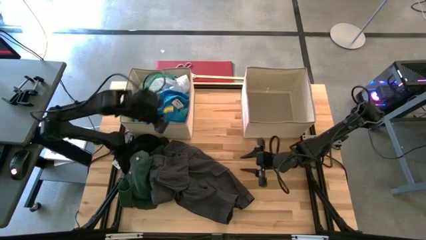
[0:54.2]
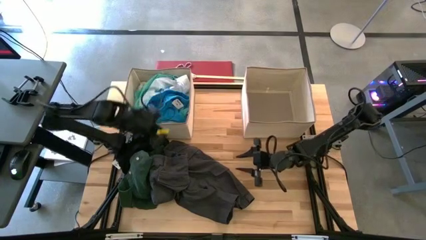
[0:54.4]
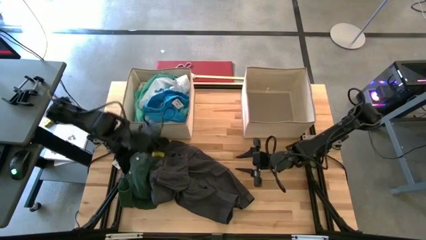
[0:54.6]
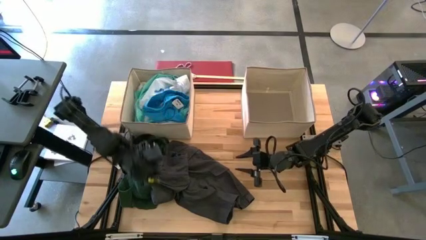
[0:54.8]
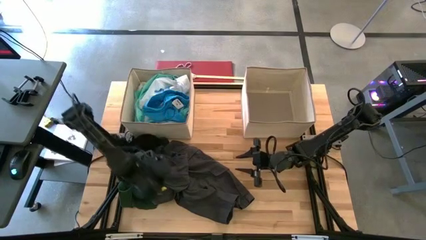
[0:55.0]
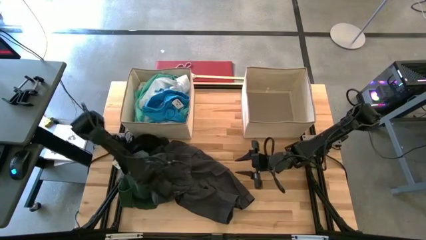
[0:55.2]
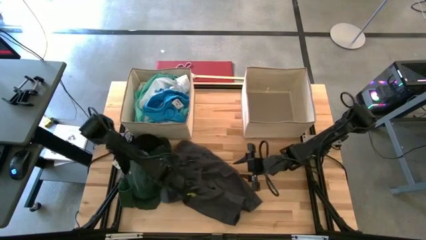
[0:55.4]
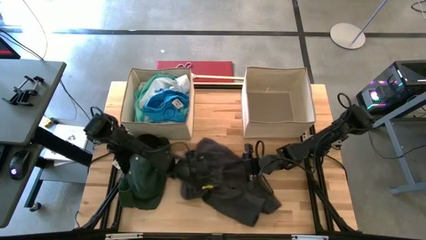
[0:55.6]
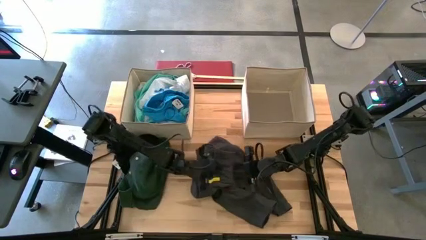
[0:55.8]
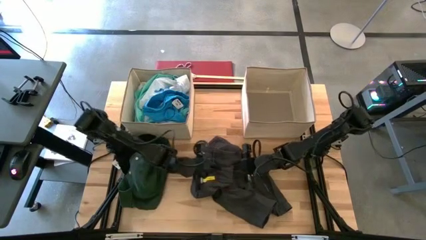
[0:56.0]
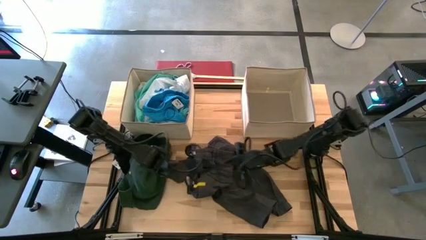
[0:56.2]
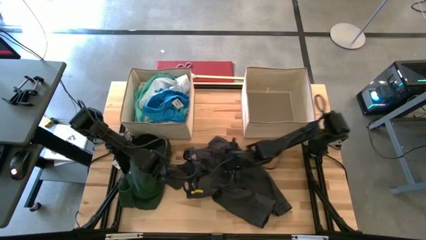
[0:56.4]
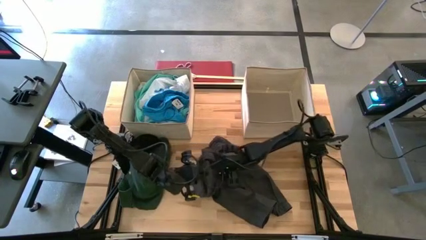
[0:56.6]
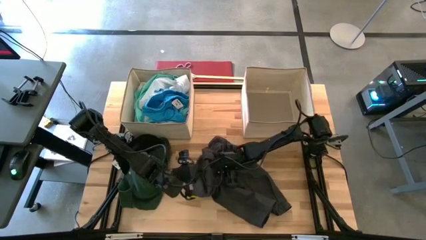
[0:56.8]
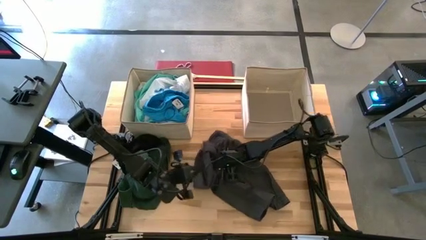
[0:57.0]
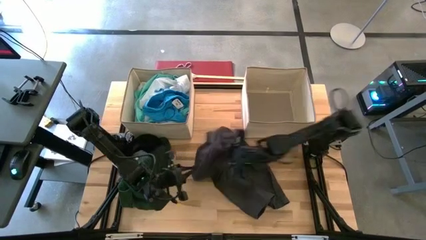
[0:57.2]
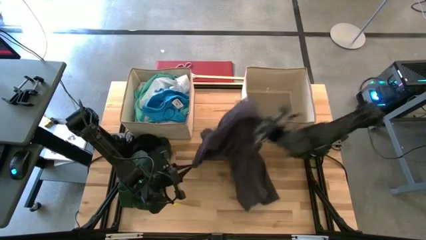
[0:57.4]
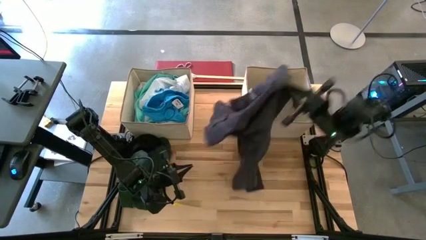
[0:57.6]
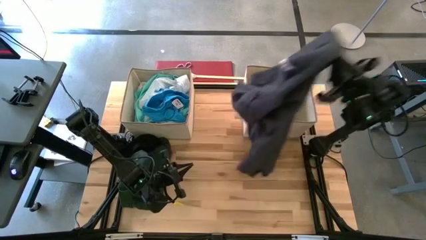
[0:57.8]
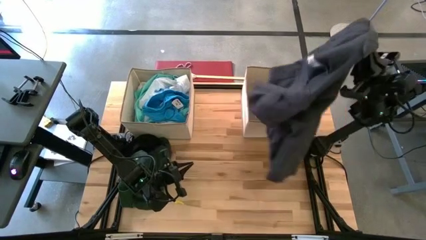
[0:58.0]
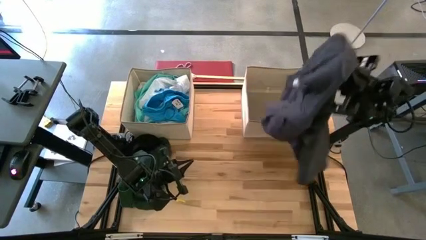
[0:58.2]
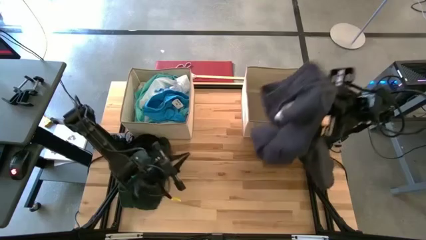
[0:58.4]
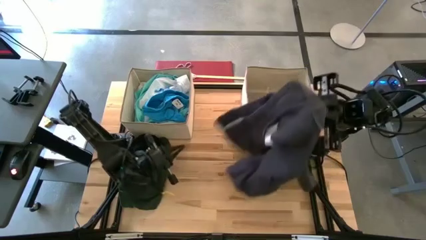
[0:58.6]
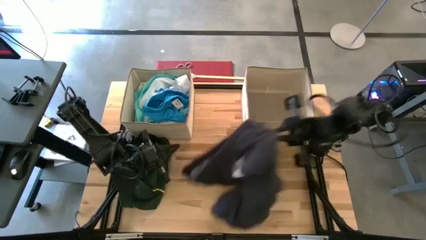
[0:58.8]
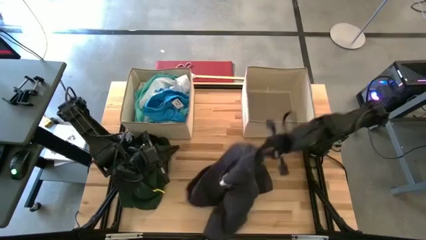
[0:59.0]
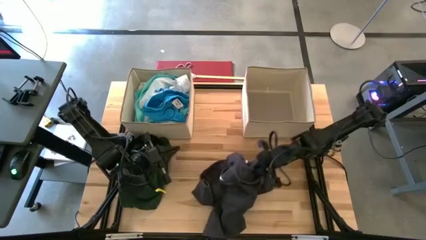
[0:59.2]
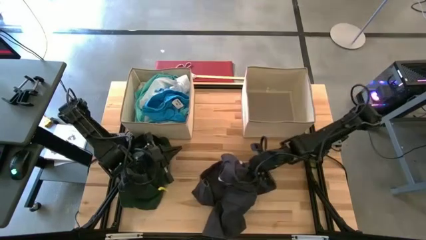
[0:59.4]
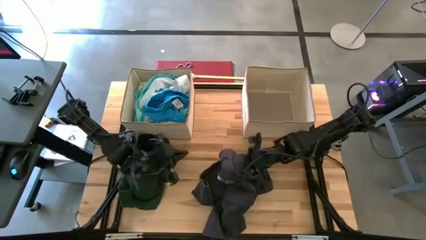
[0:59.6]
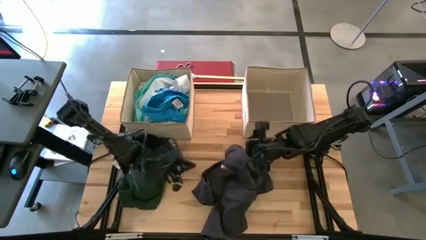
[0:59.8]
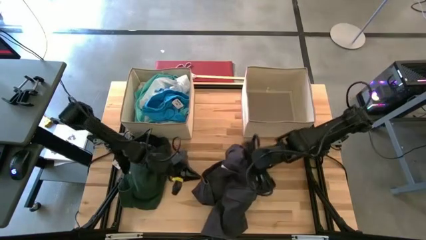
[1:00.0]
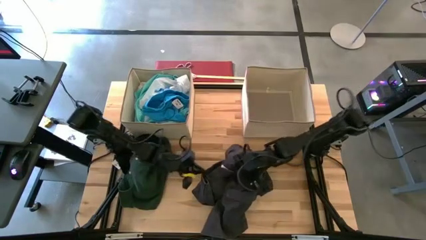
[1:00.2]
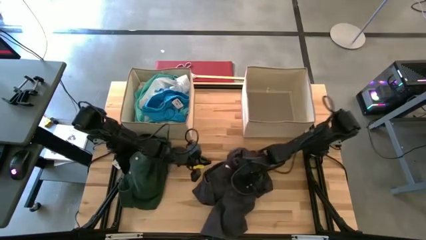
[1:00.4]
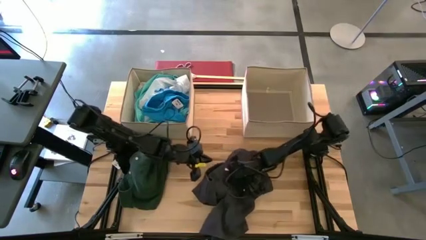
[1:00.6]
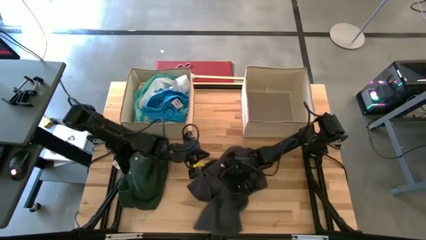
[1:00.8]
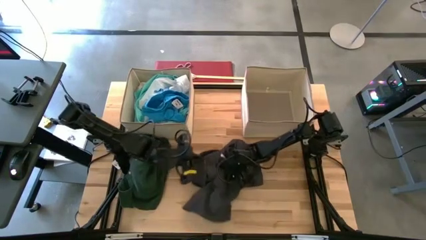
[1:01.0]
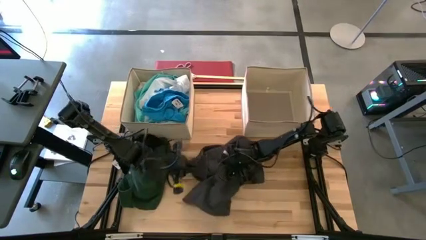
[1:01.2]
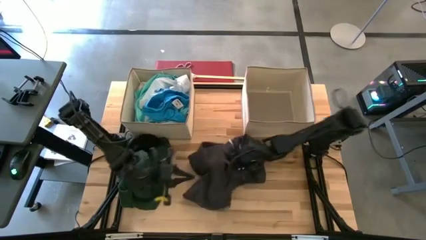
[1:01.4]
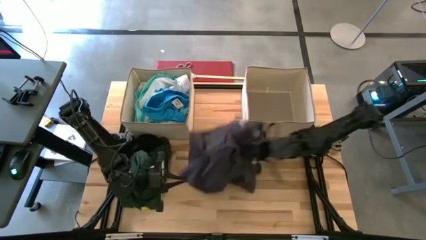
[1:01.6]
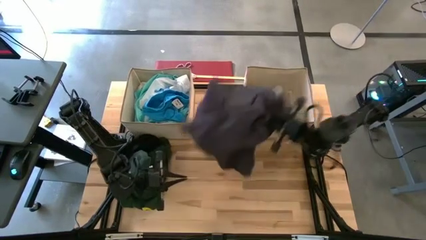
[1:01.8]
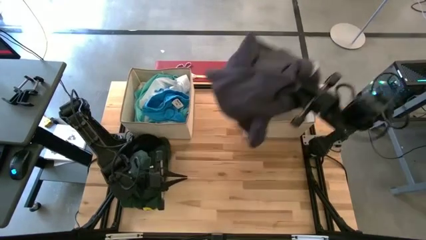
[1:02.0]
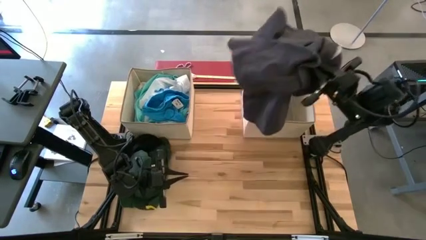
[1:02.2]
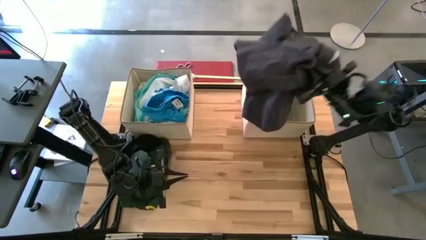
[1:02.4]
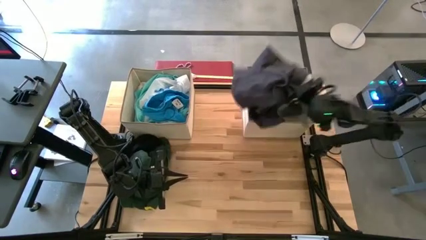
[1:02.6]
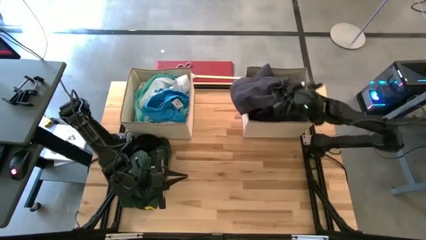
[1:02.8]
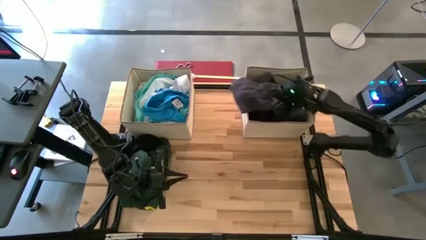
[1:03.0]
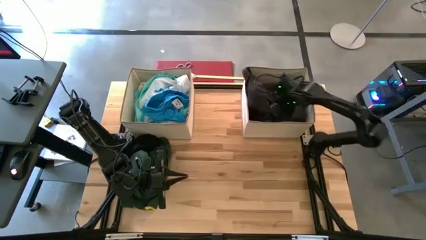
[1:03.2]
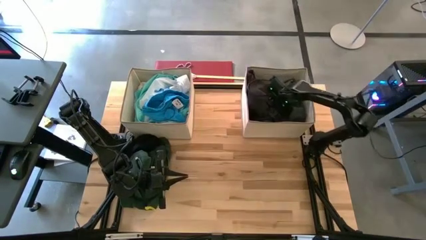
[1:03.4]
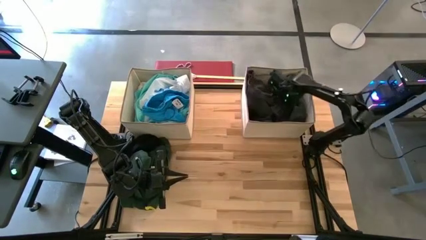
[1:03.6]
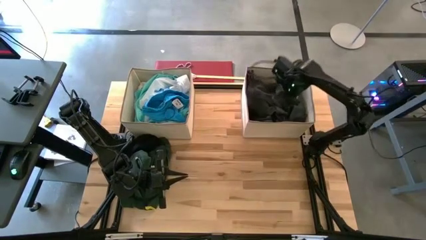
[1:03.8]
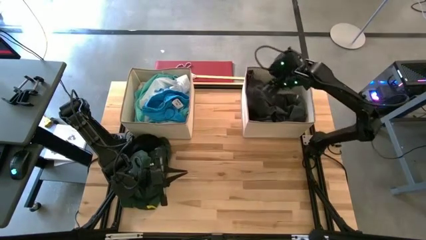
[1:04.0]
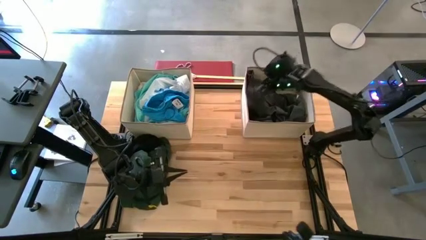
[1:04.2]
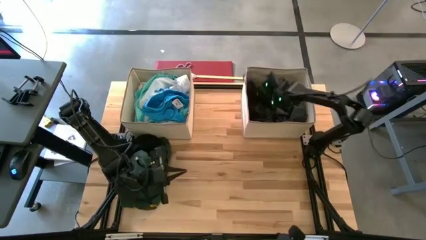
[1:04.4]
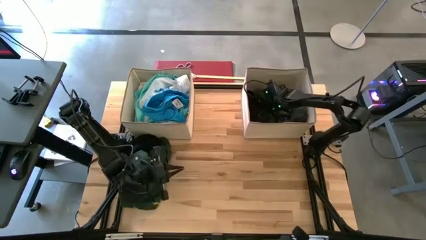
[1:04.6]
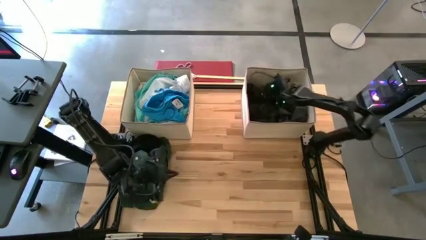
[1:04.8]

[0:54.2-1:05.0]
Task: Sort clothes
Put the pants into the right laundry organizer

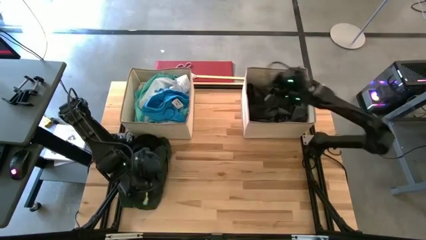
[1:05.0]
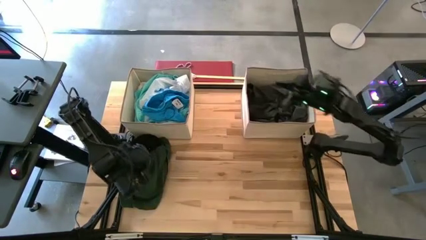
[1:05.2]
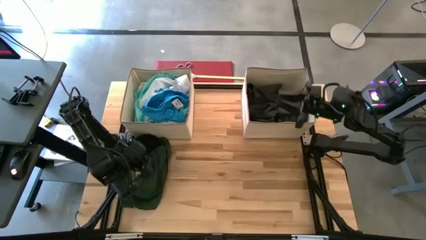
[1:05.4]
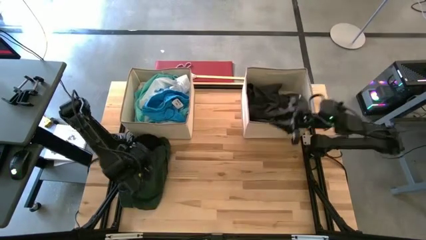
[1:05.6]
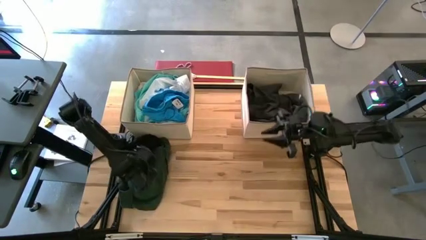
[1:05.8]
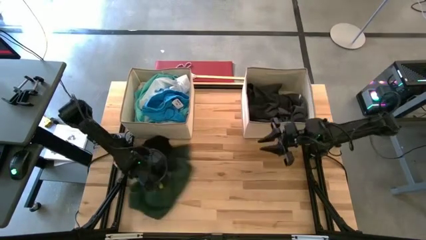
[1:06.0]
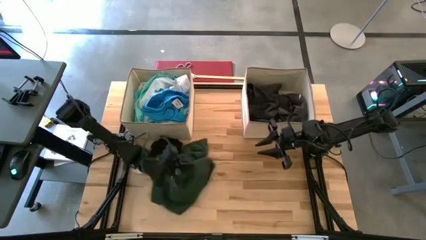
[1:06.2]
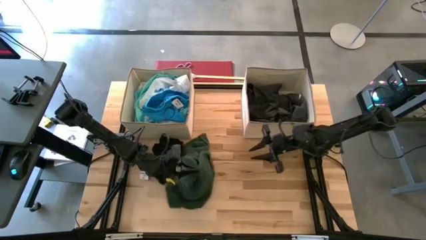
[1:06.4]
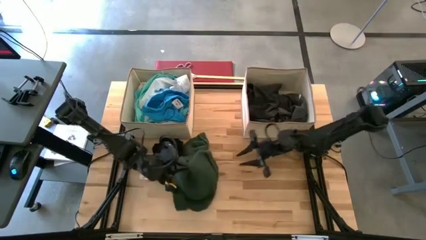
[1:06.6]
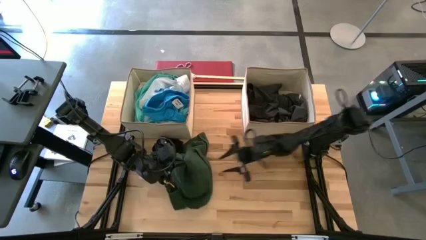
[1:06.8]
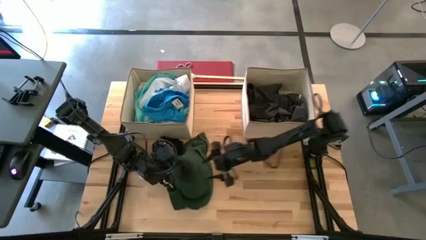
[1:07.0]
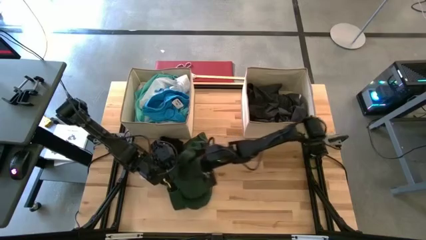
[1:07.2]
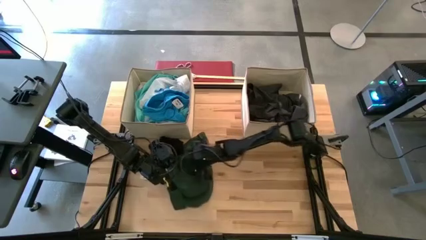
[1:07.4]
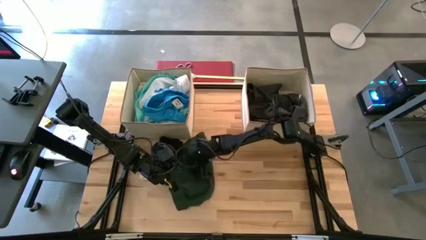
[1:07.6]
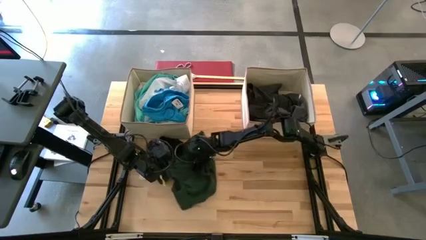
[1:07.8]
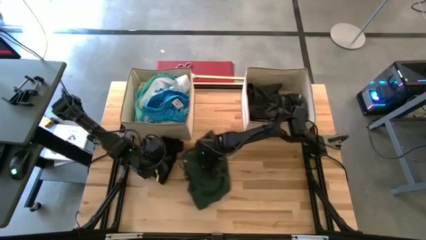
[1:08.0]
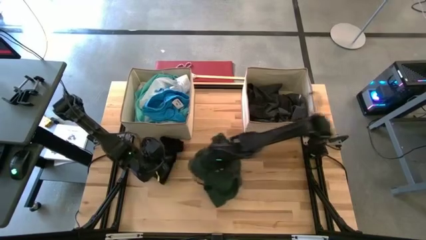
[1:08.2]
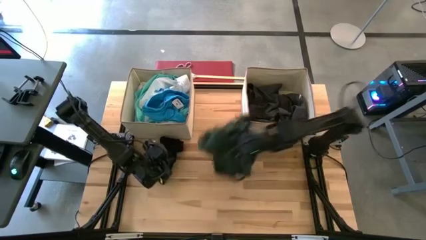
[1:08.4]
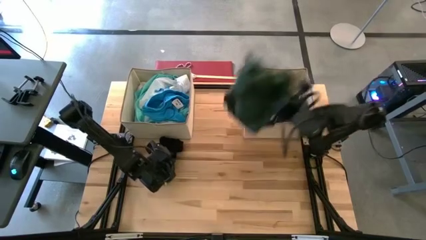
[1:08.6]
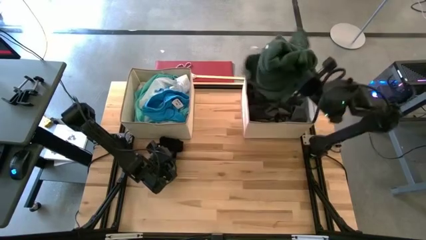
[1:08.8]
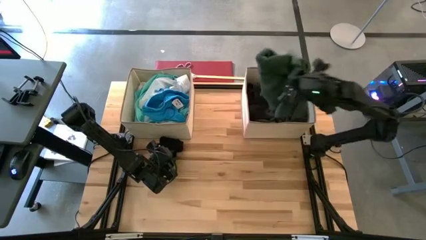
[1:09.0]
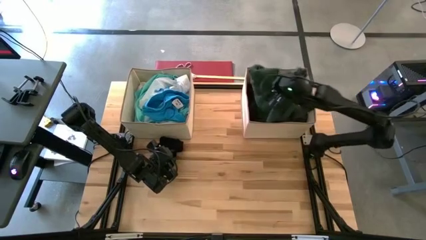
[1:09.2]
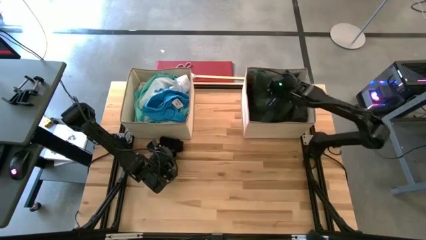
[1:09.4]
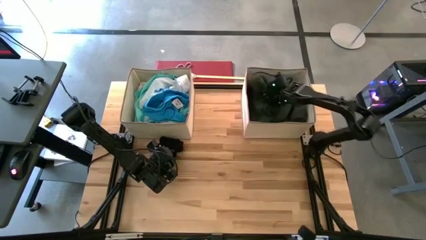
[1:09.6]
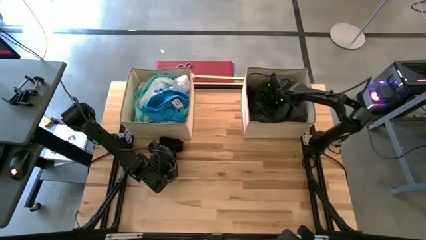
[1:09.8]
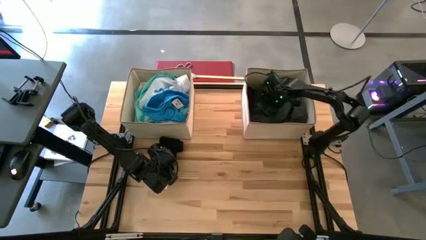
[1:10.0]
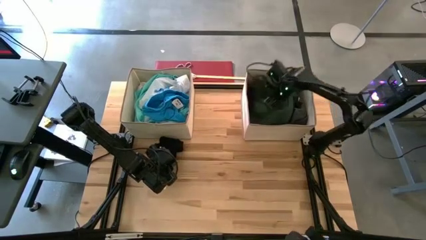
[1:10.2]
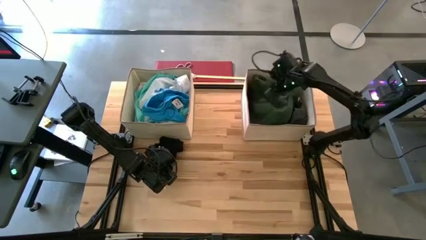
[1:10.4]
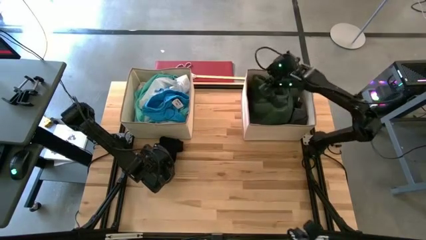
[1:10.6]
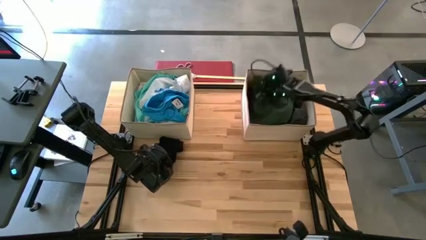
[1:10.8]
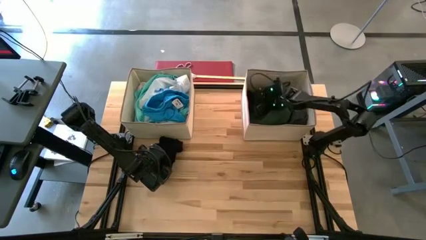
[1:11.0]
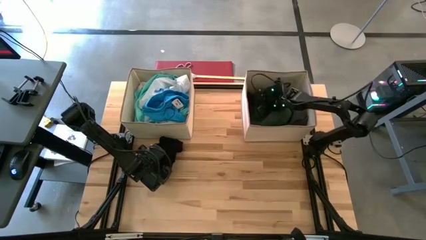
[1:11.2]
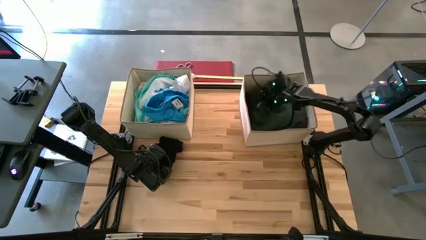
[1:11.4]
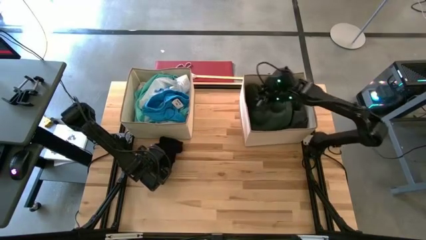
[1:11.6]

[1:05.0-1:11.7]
Put the dark green shirt into the right laundry organizer
